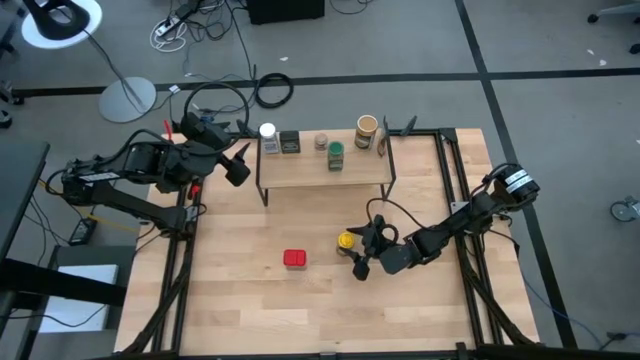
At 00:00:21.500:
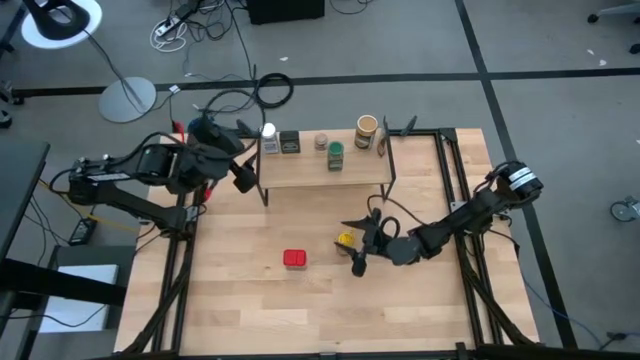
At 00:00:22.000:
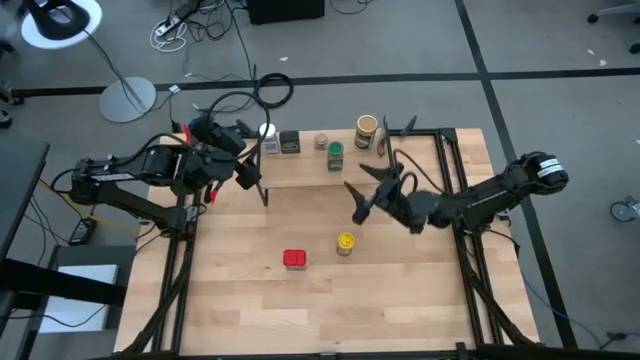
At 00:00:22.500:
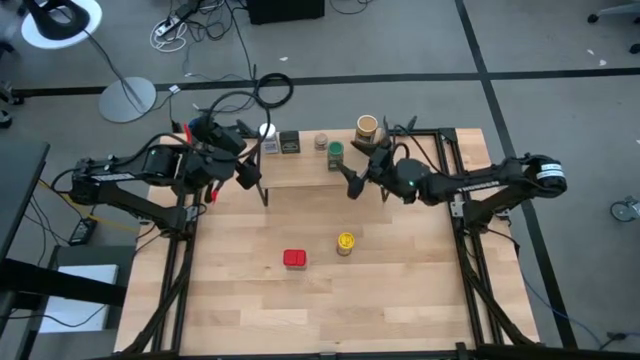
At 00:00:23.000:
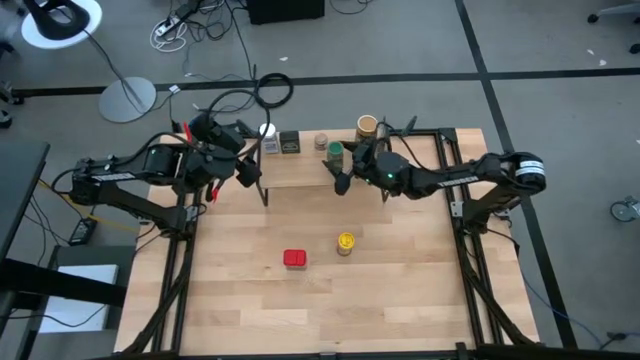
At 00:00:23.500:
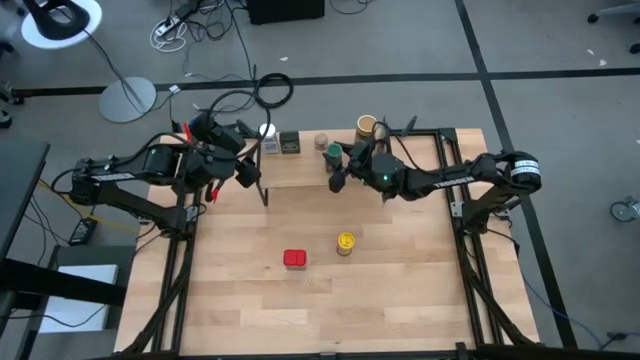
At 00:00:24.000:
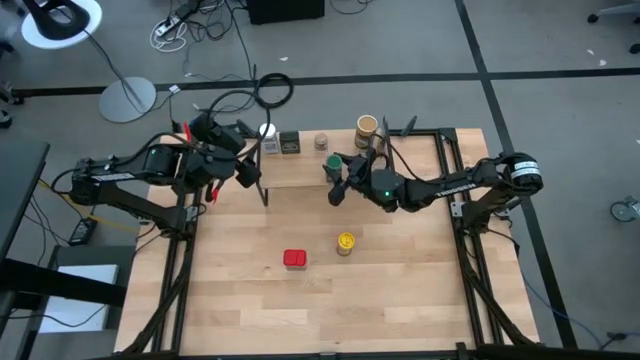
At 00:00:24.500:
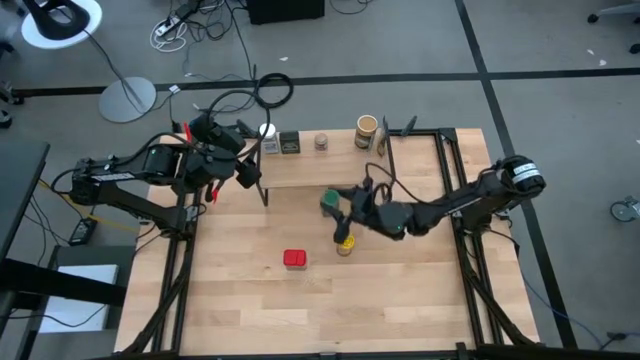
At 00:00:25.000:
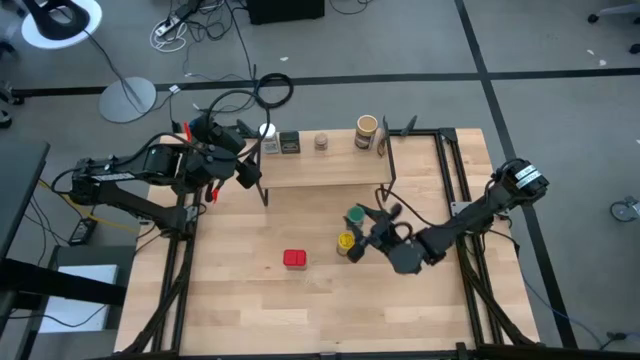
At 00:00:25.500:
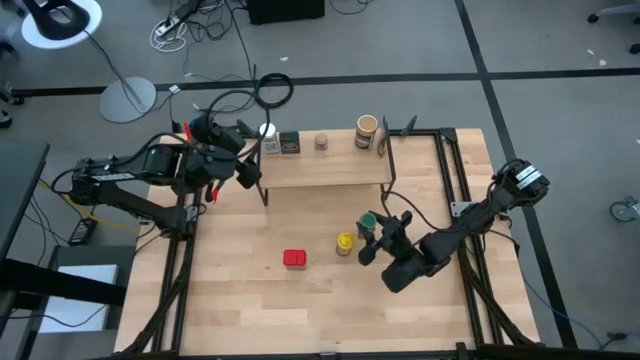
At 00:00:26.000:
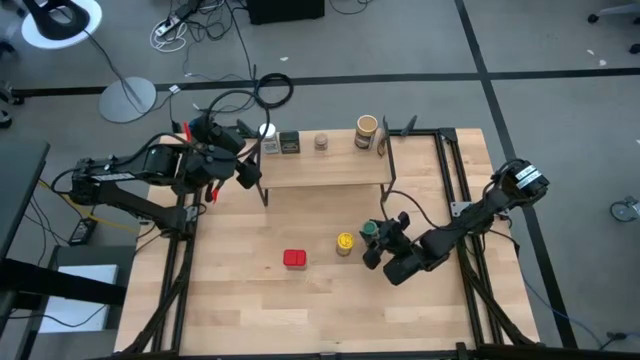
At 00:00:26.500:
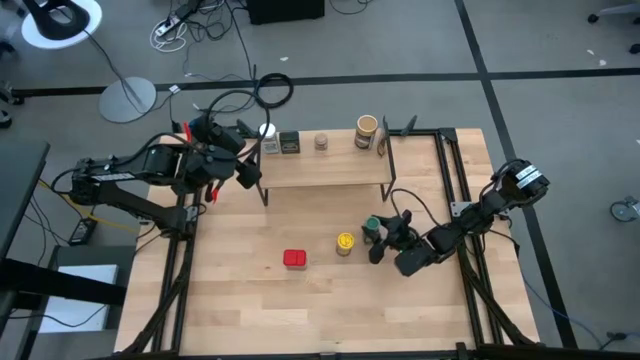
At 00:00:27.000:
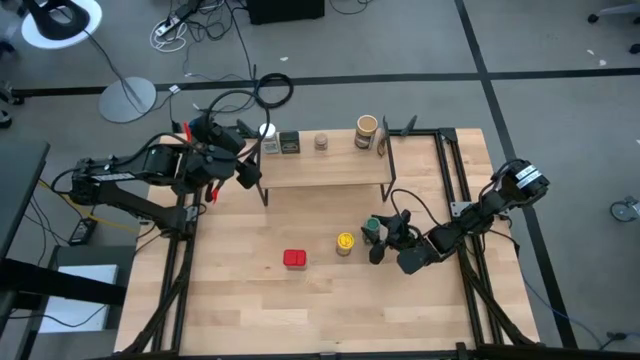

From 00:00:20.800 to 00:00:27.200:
Task: Shelf spices
Remove the green seasoning bottle from the shelf

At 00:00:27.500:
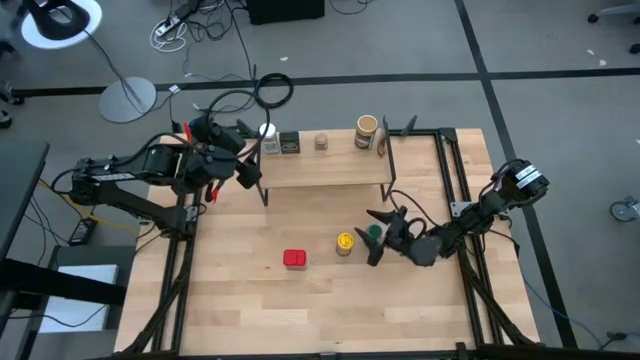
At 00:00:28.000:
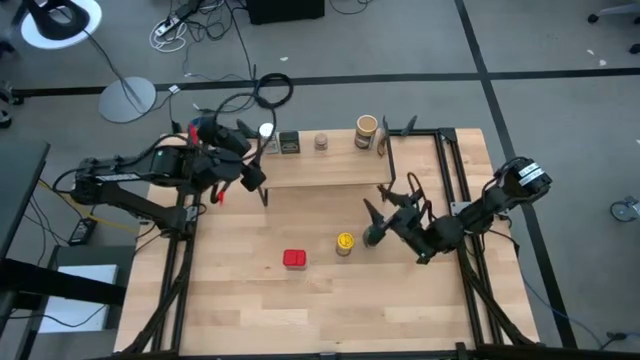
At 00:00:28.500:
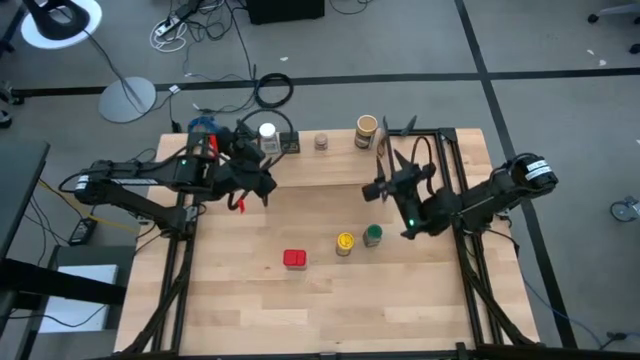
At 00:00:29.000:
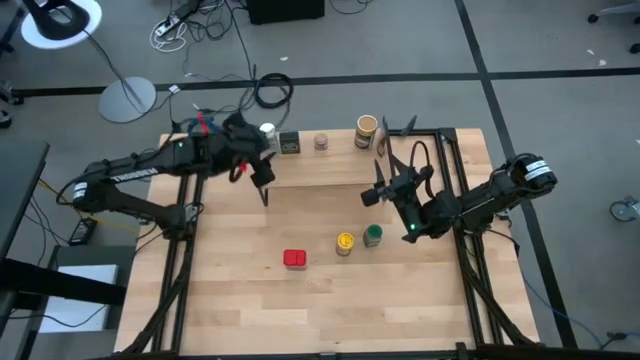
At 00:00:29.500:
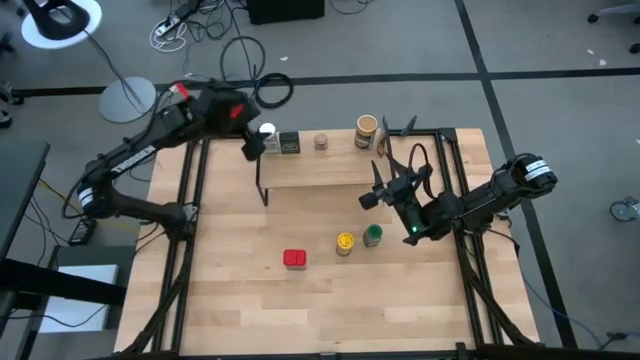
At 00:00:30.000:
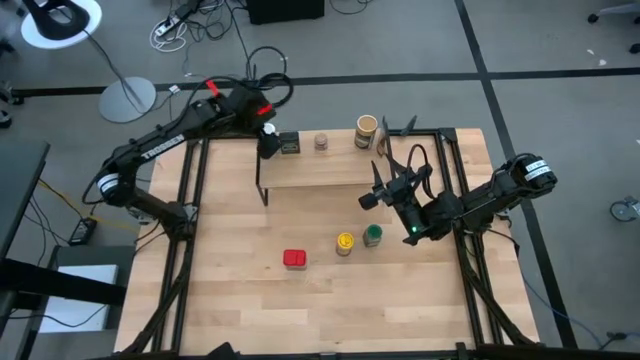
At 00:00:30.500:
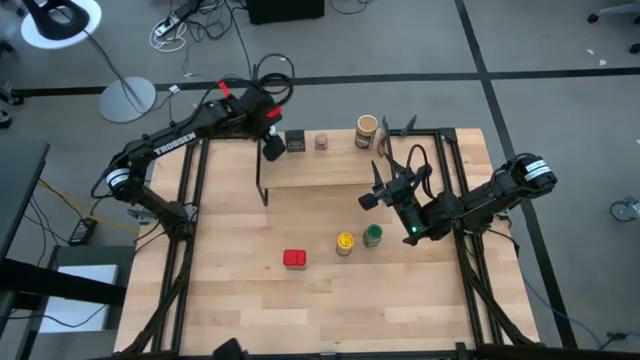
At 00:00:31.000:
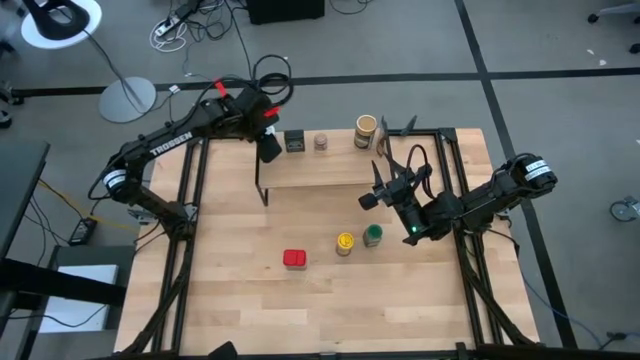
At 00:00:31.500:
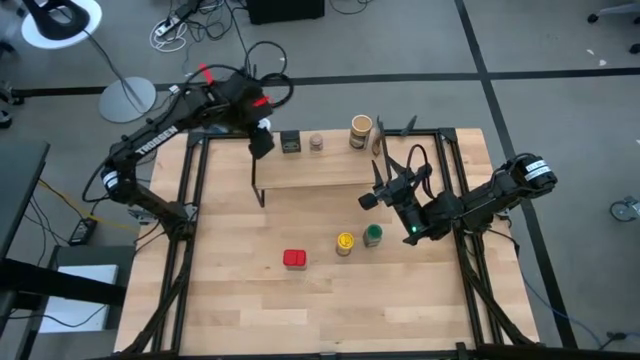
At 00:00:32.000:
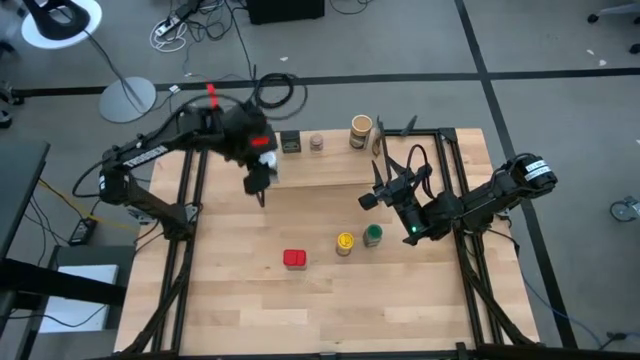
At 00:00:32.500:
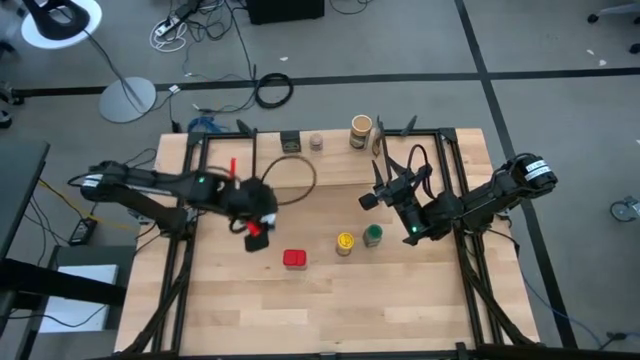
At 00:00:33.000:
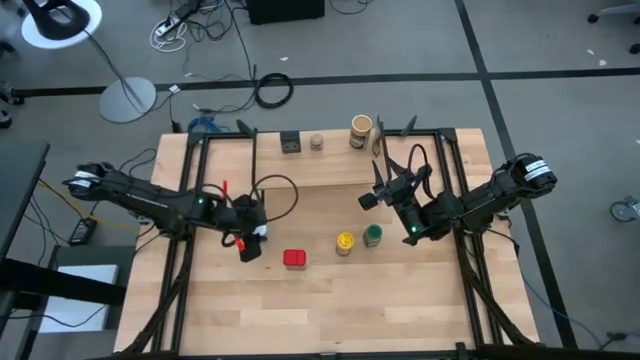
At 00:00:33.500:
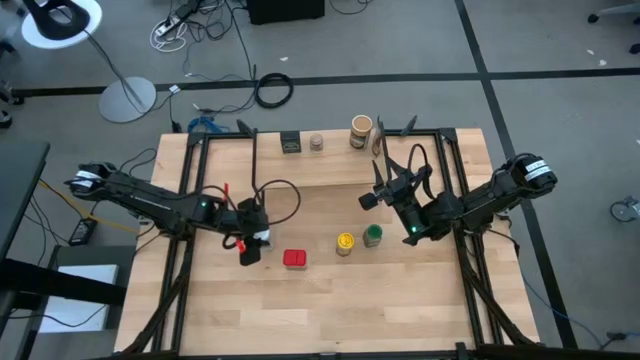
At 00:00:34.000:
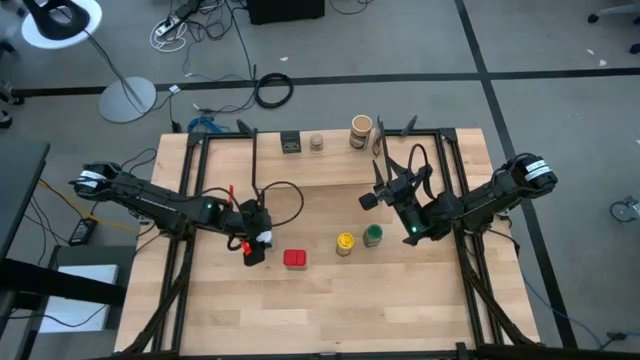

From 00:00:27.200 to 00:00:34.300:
Remove the white seasoning bottle from the shelf

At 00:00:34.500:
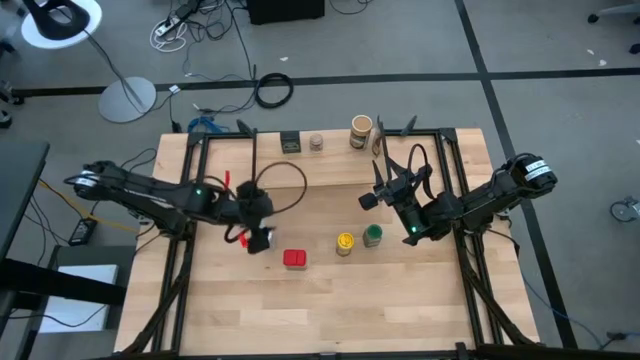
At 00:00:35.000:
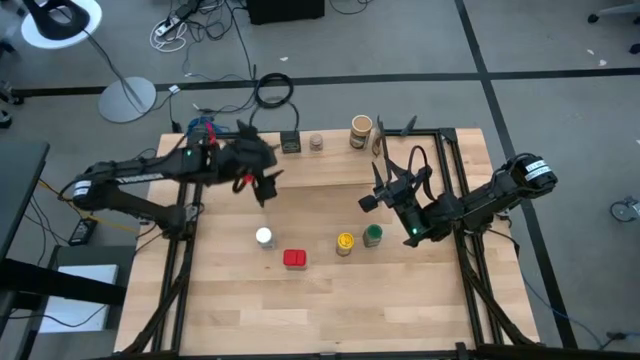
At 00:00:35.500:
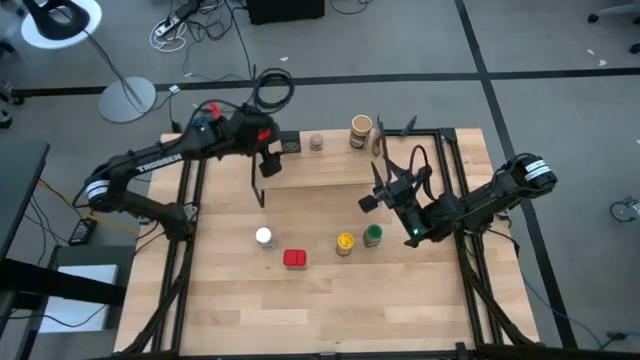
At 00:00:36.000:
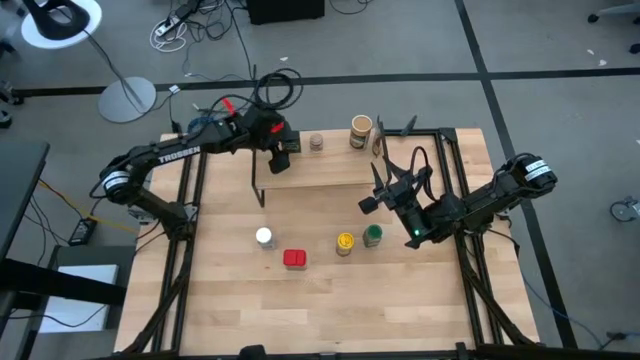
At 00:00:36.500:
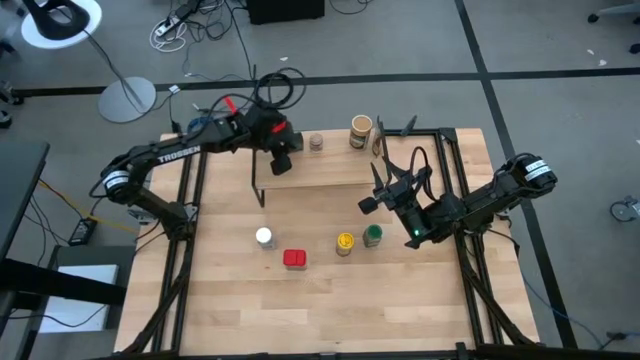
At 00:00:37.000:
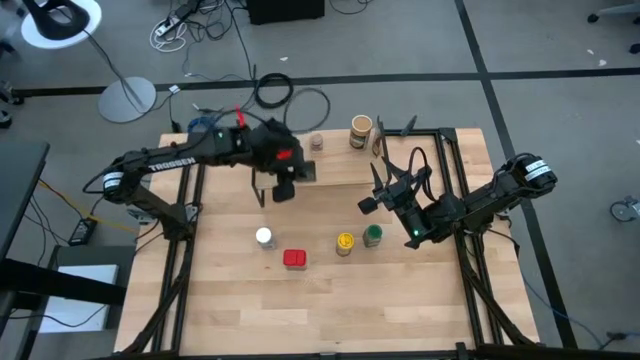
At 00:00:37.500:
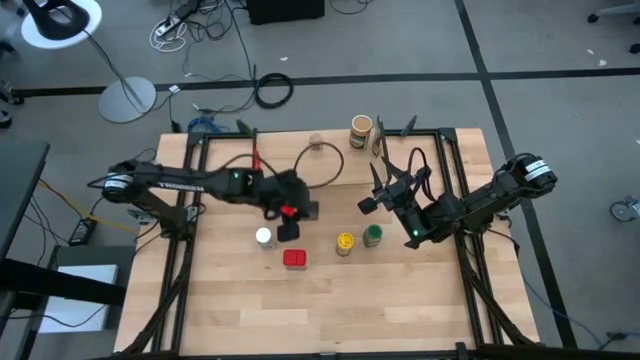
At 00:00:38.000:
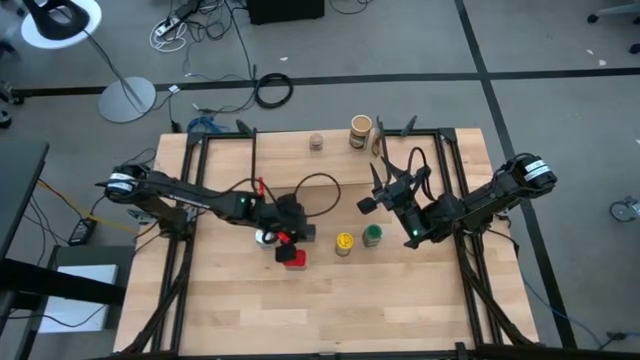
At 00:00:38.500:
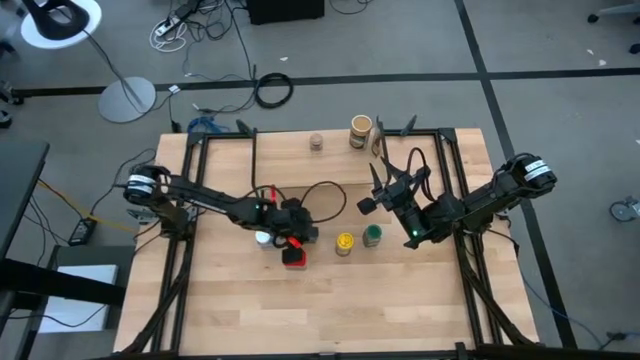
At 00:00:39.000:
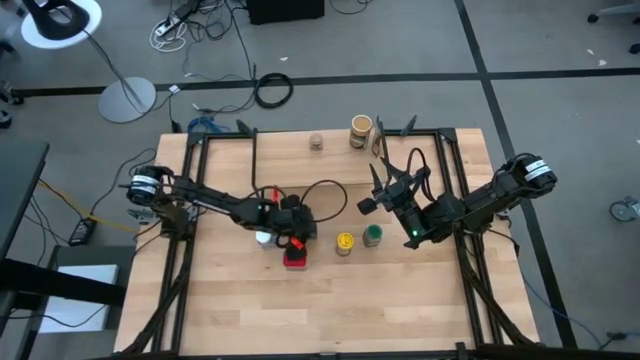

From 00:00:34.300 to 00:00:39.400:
Remove the black seasoning can from the shelf

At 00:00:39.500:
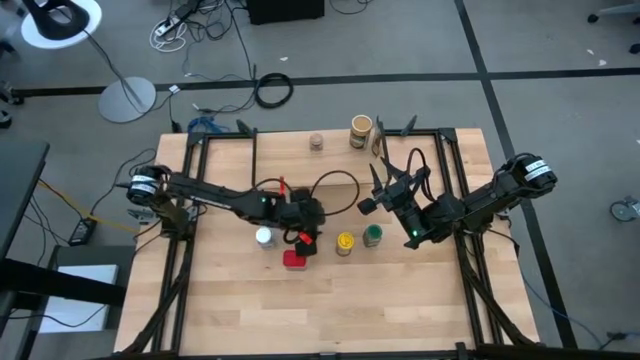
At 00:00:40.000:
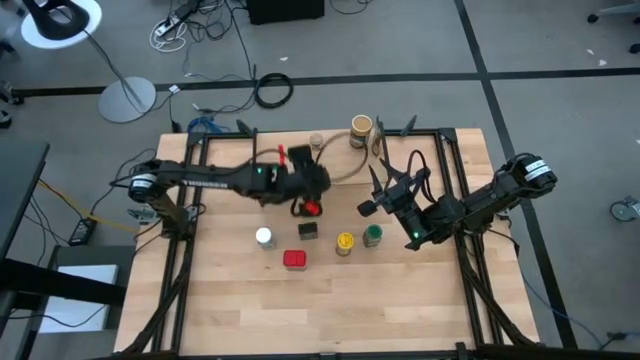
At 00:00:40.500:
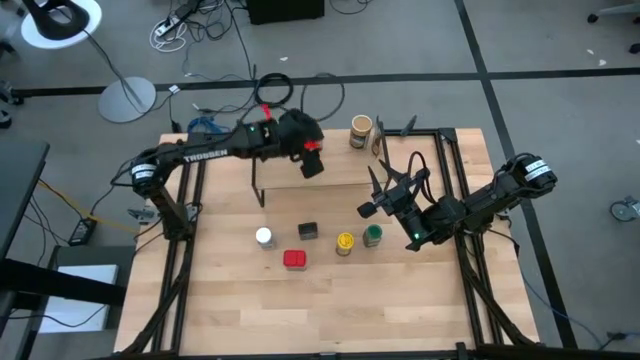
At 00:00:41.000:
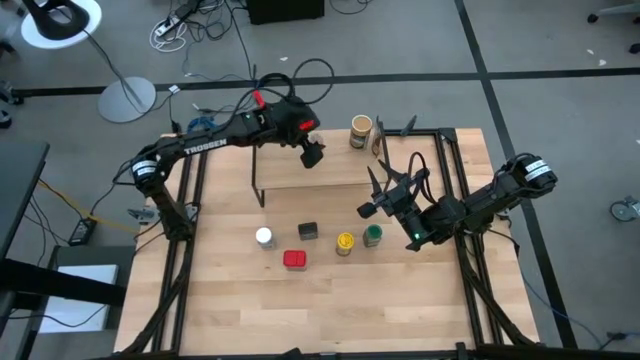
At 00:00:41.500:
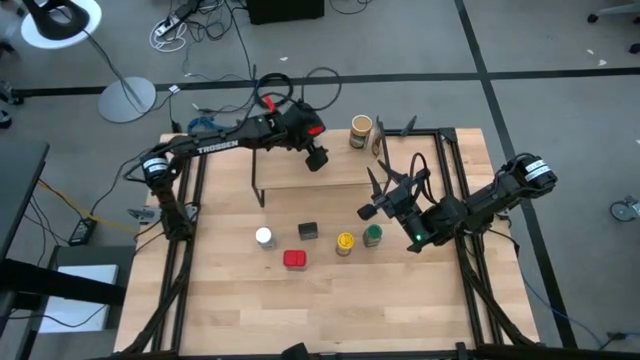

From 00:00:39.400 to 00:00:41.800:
Remove the orange seasoning bottle from the shelf
